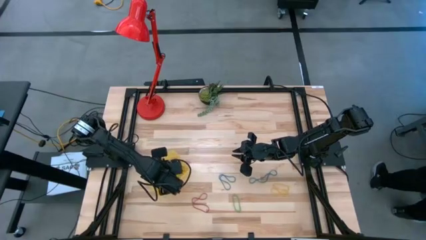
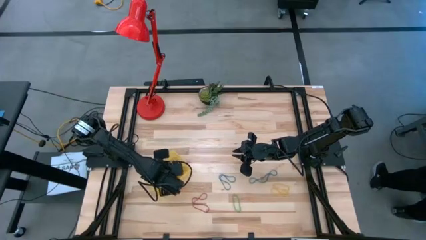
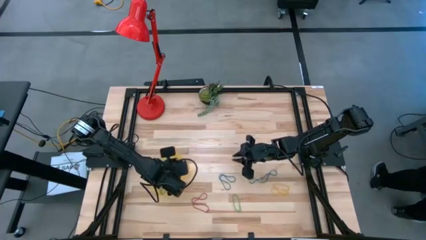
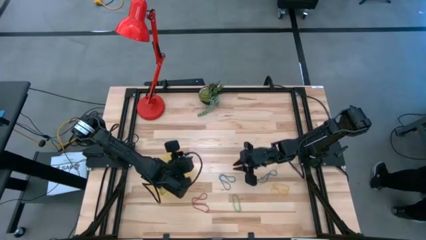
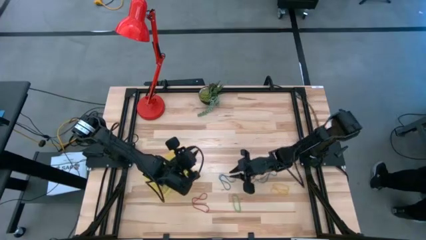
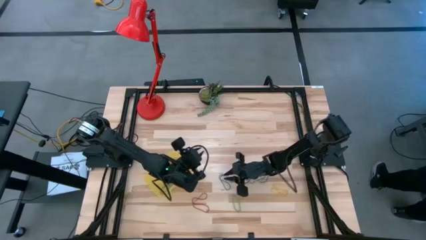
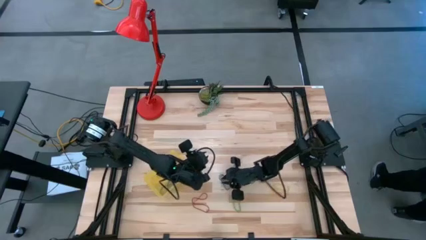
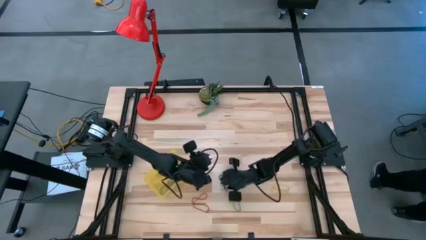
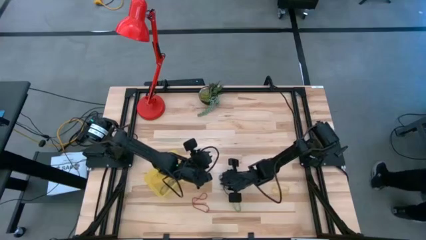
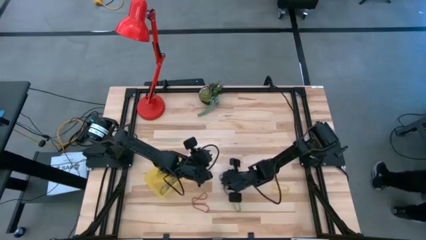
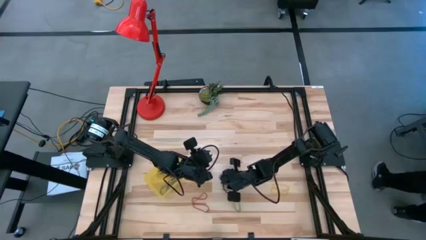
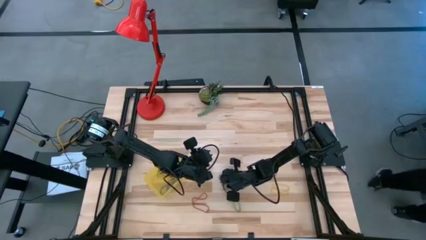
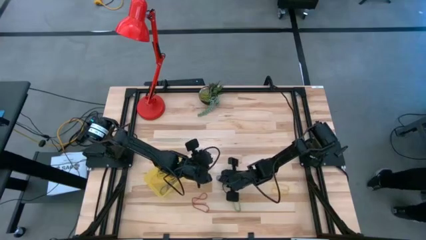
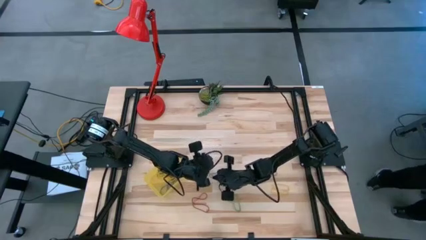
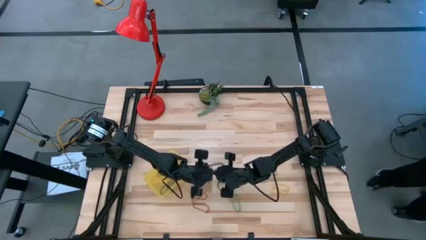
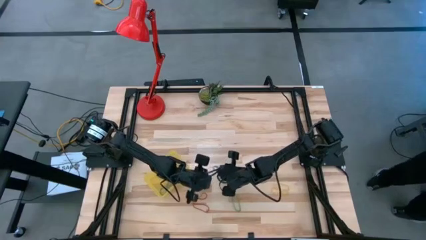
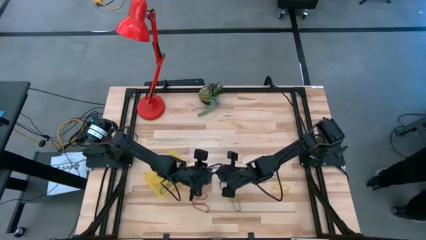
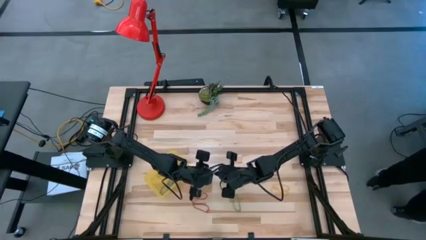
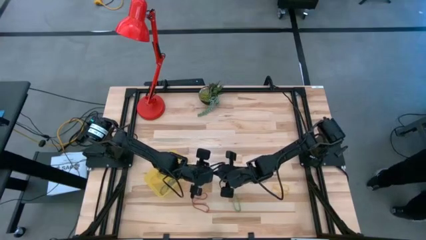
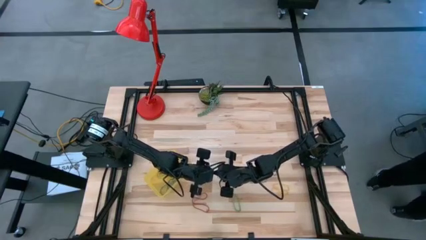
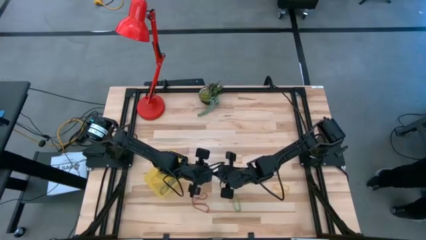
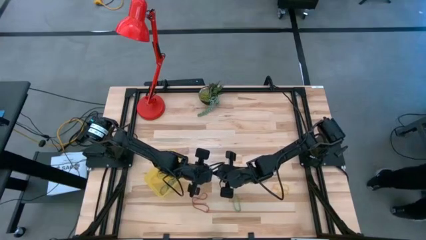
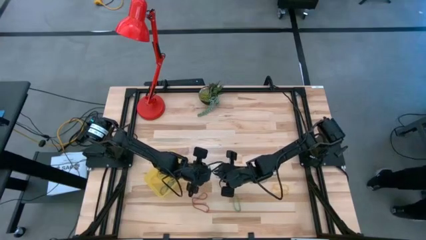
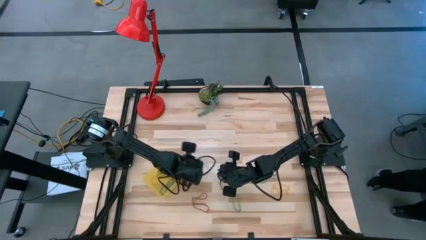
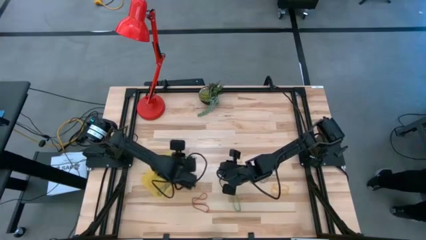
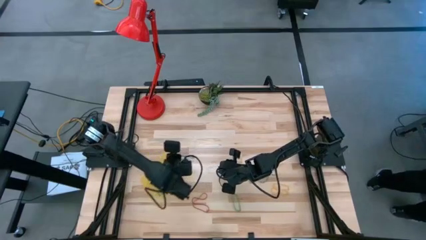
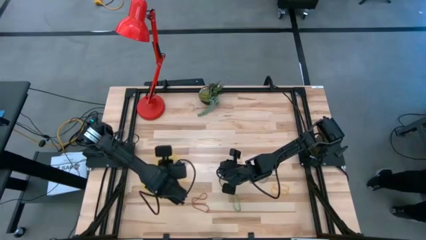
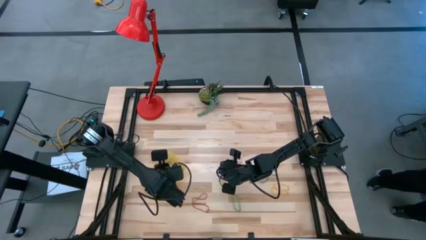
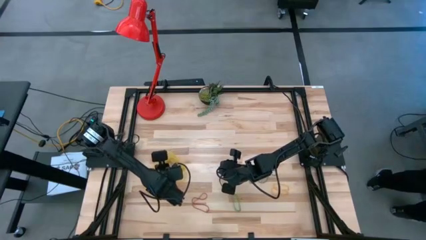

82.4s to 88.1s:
Task: Pick and place items into bin
Put the blue rubber band into the yellow bin

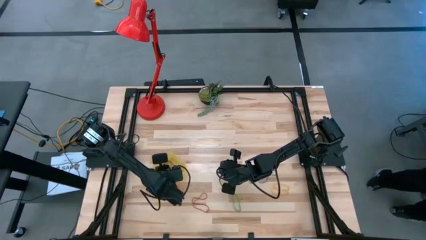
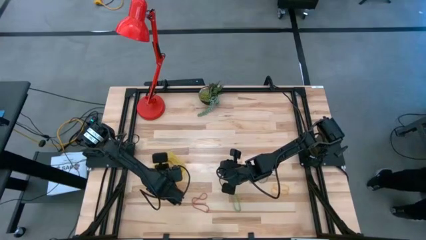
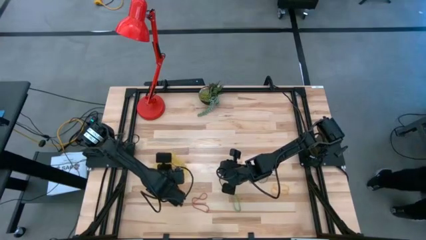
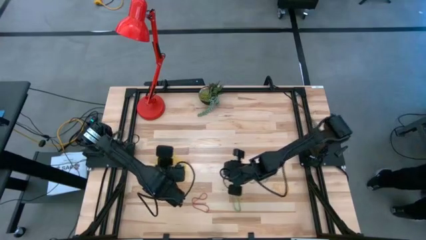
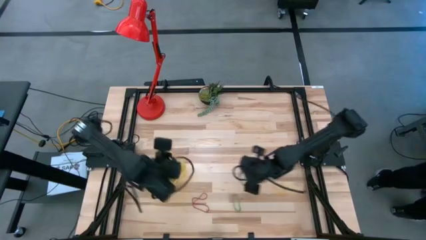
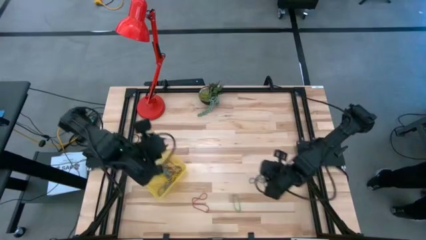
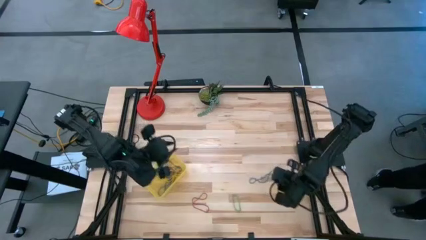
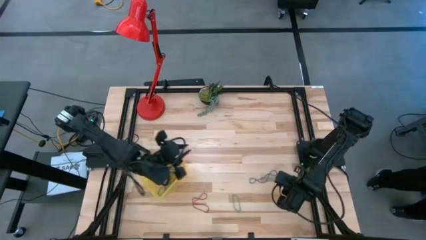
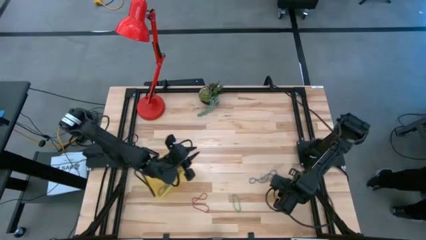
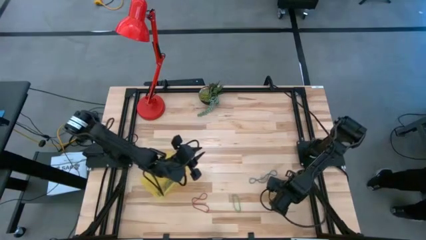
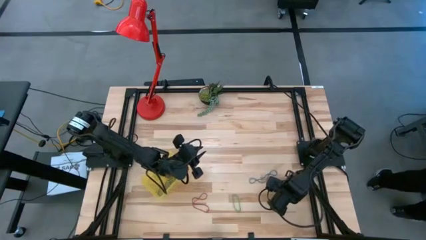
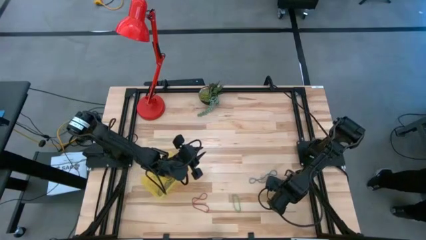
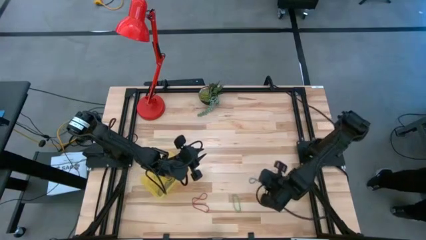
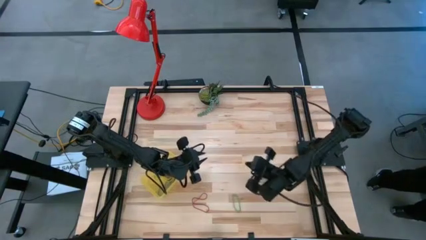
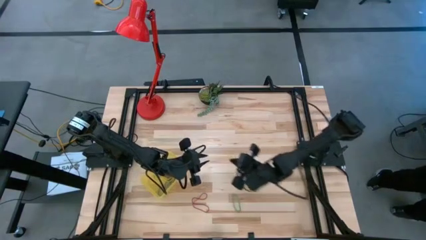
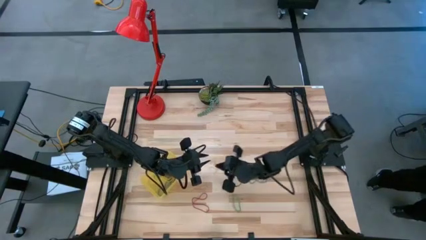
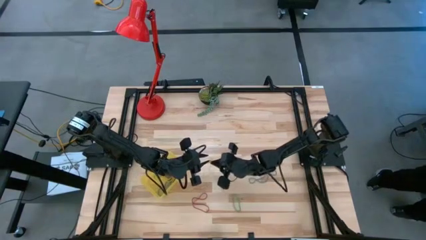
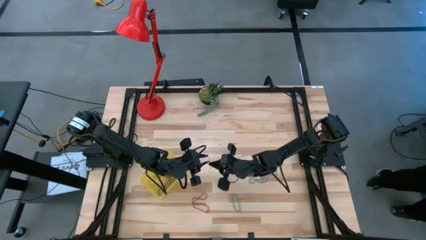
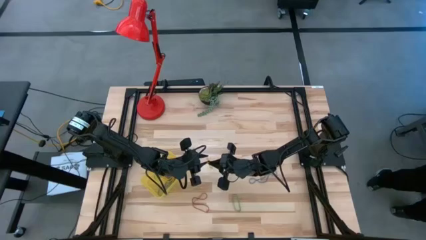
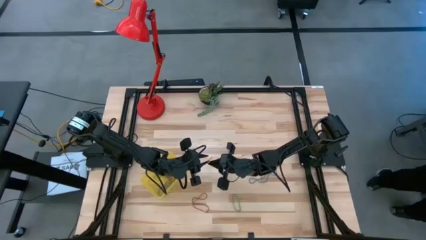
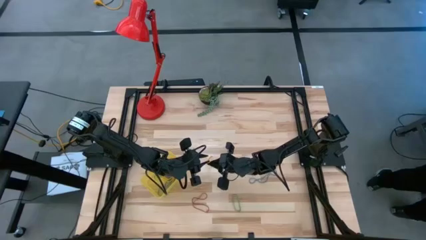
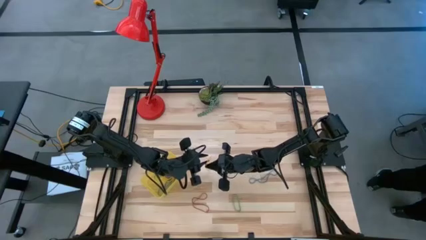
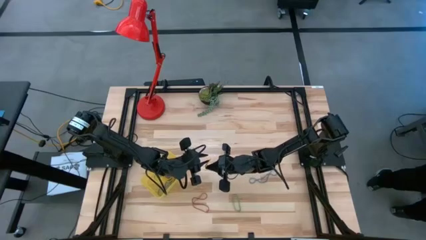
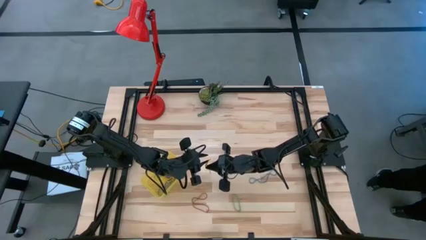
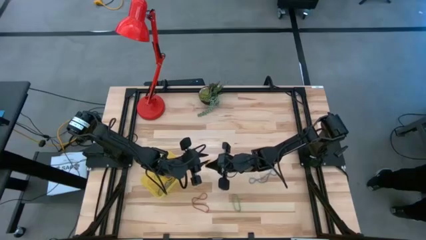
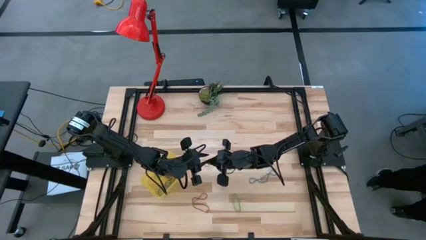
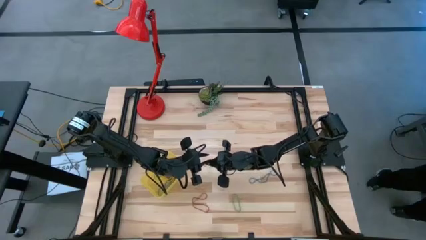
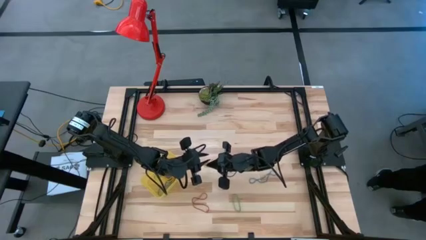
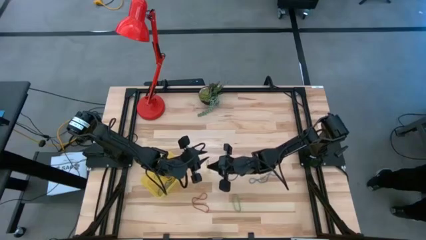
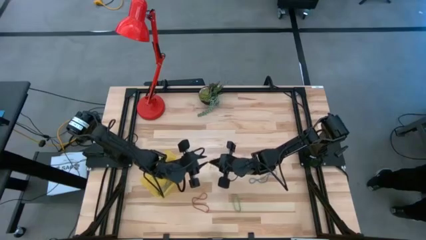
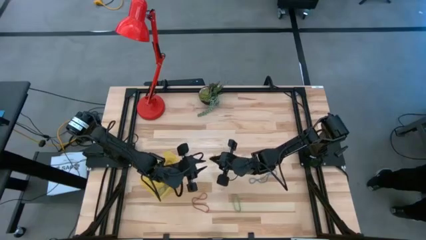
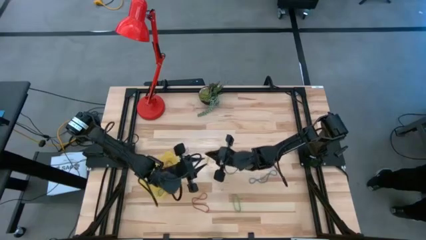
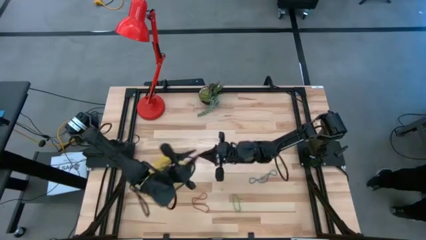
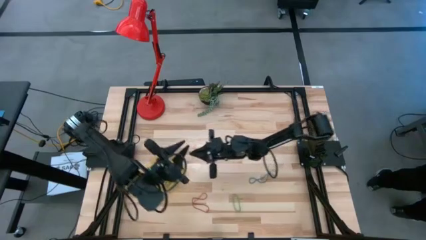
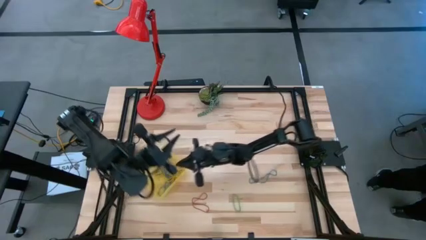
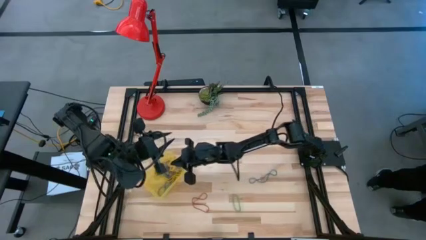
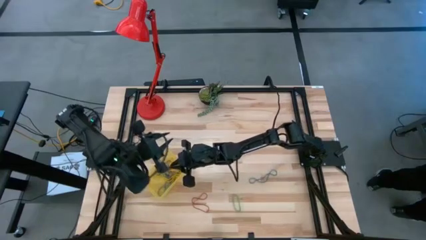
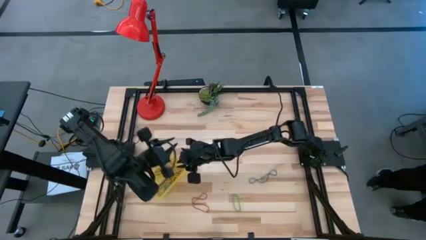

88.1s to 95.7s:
Put the yellow rubber band into the yellow bin

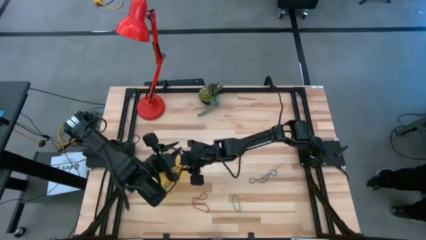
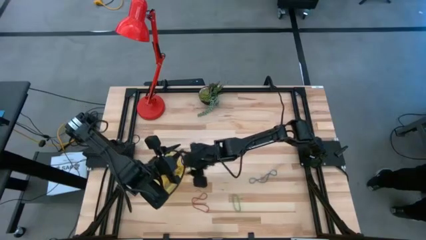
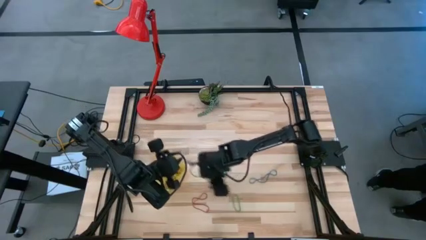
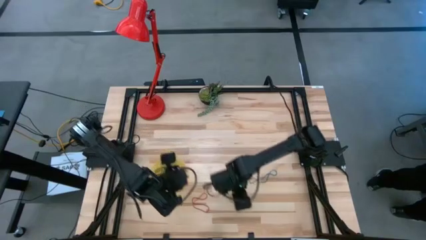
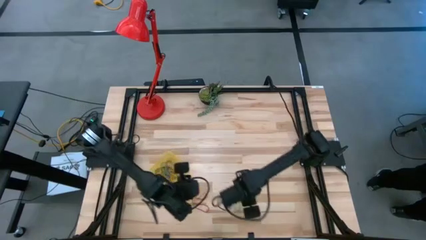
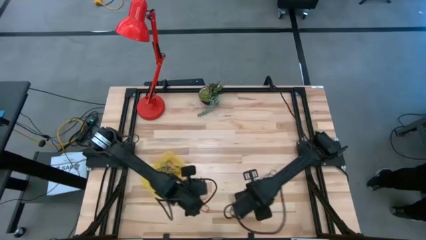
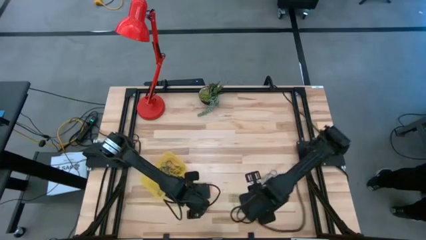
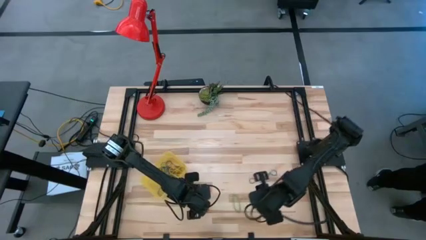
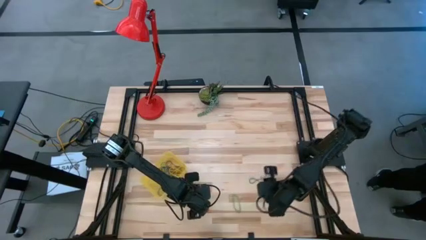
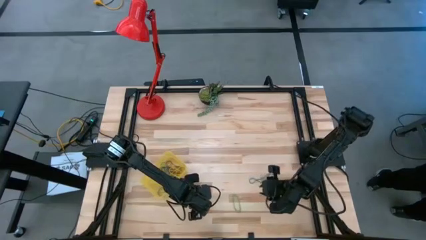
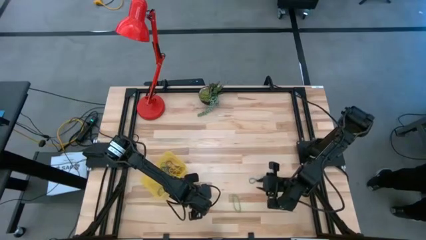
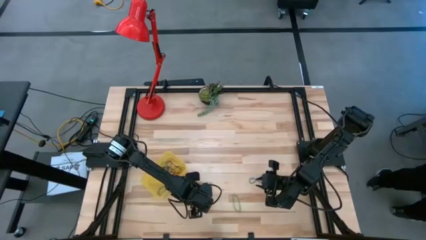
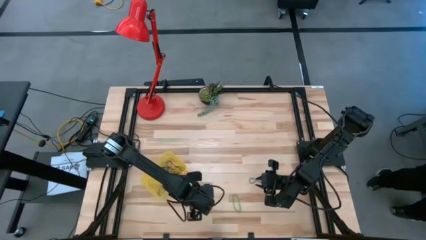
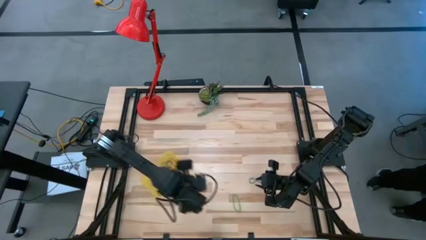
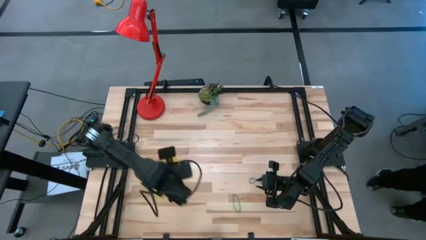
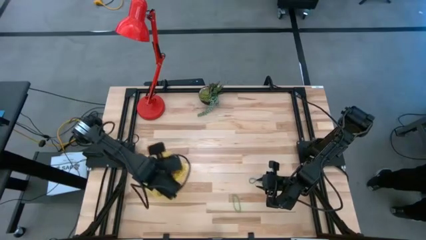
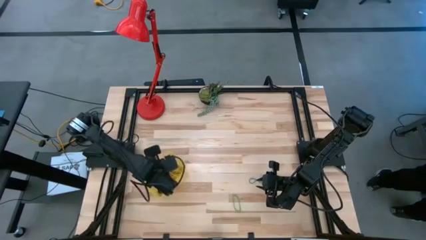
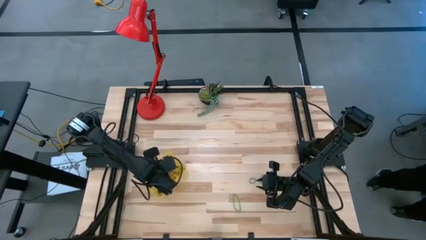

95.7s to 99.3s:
Put the red rubber band into the yellow bin
